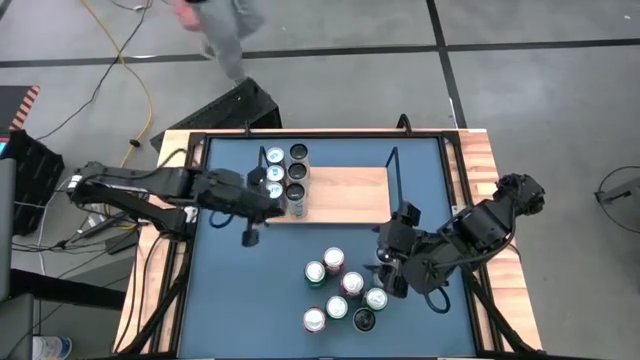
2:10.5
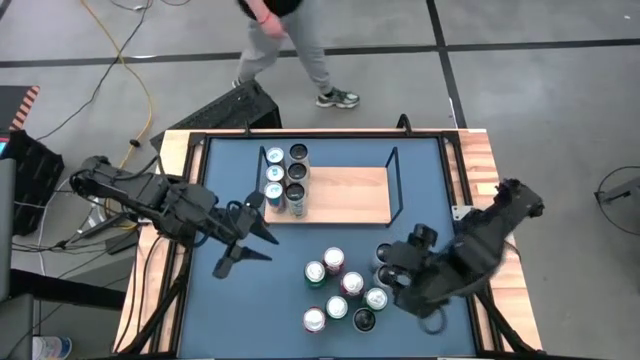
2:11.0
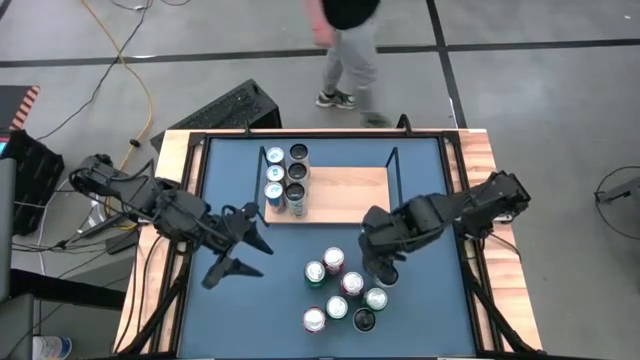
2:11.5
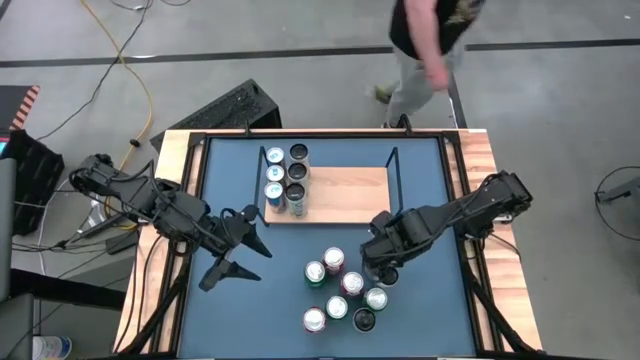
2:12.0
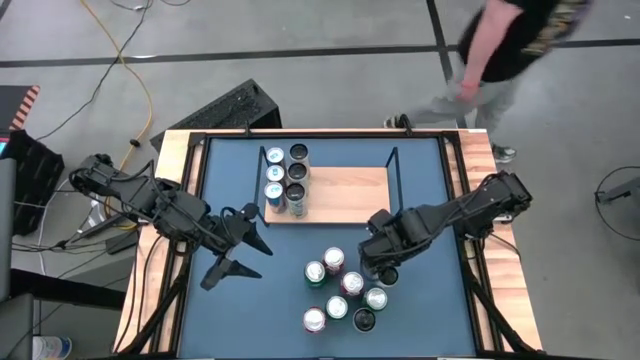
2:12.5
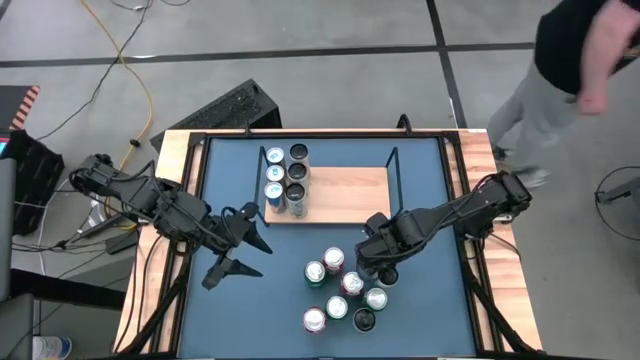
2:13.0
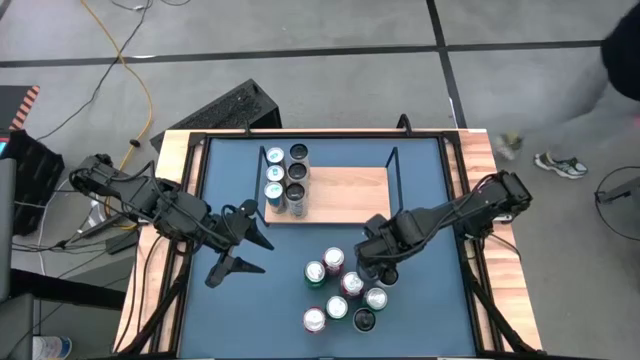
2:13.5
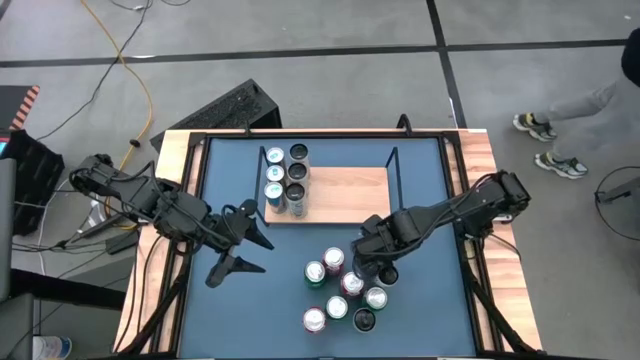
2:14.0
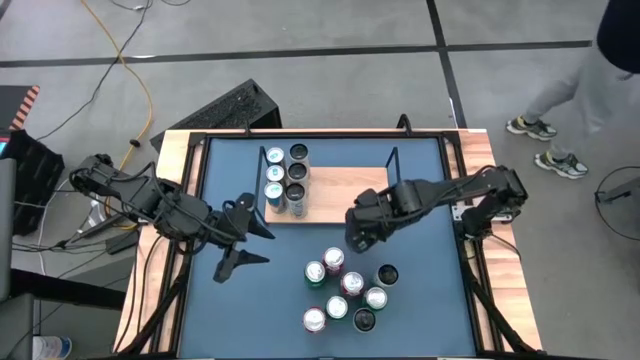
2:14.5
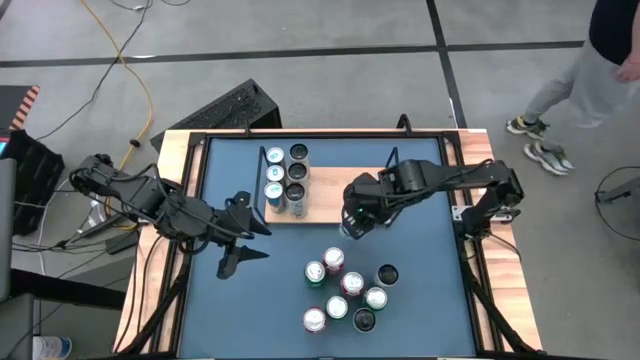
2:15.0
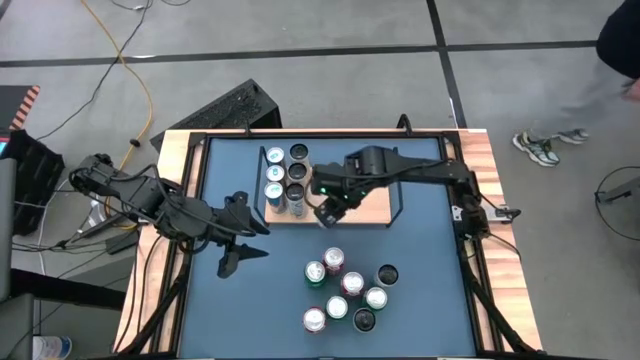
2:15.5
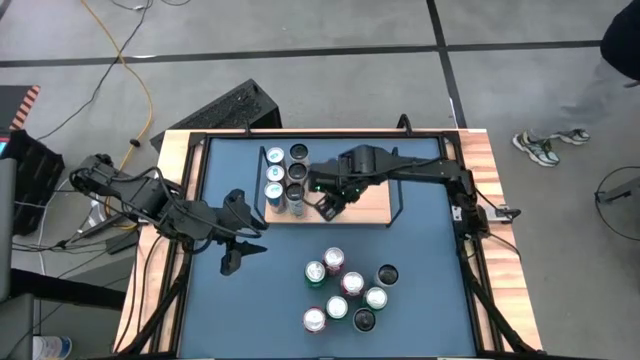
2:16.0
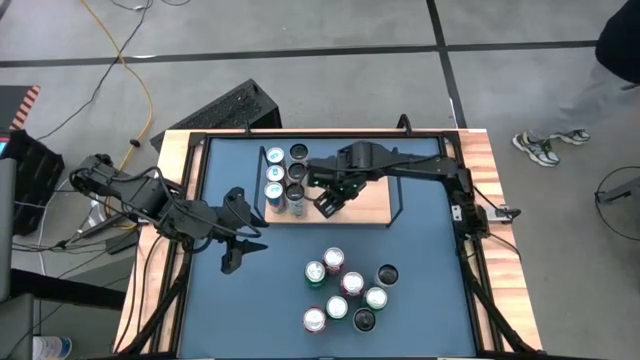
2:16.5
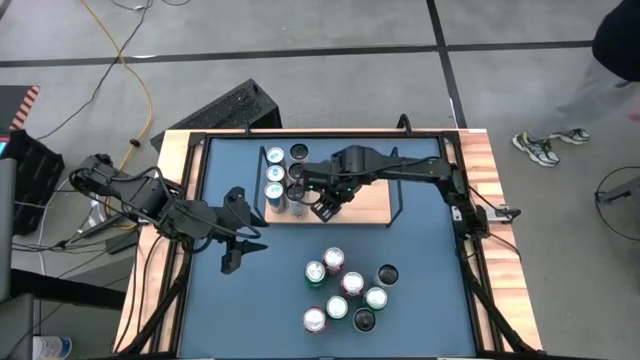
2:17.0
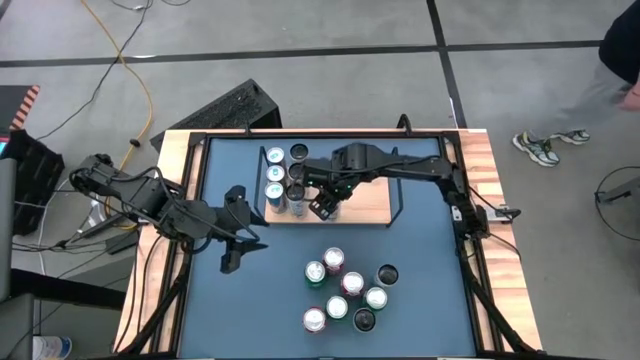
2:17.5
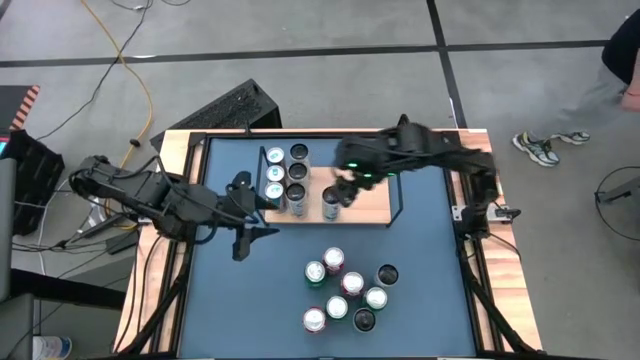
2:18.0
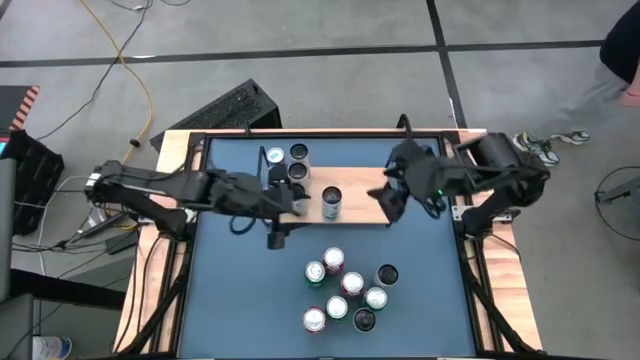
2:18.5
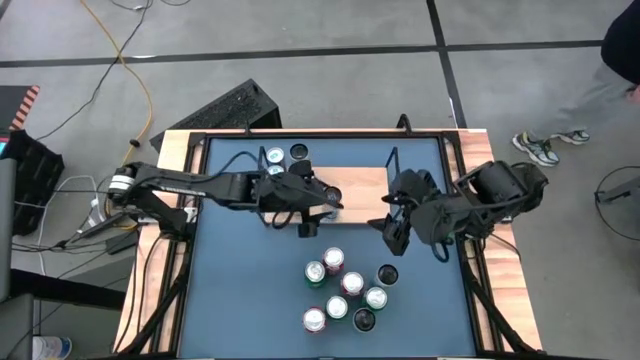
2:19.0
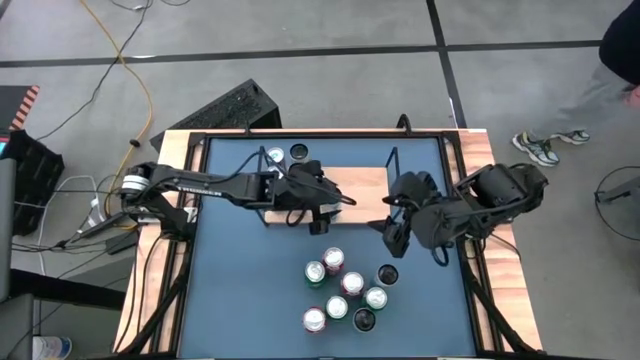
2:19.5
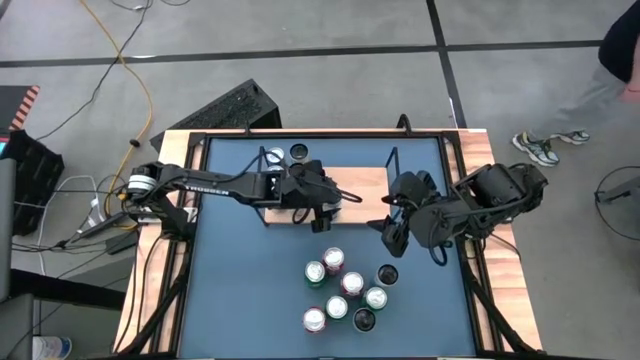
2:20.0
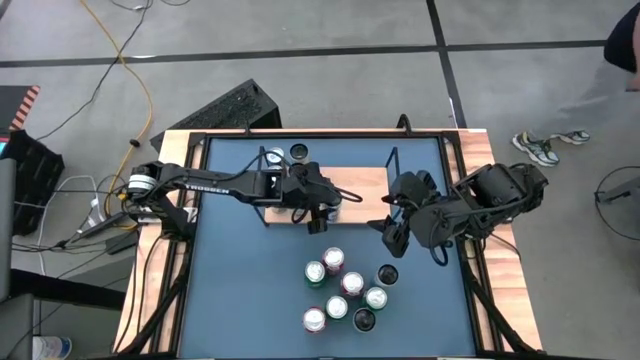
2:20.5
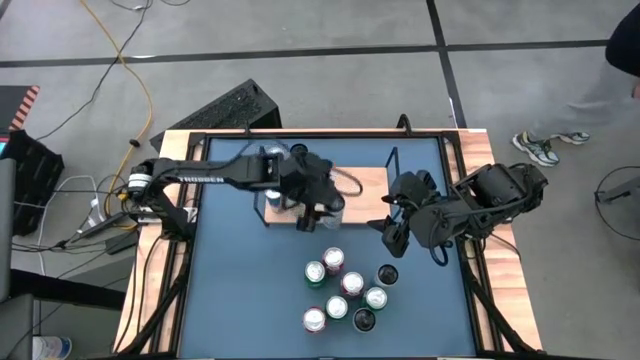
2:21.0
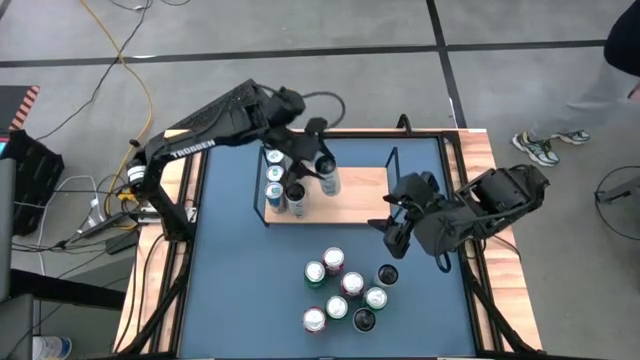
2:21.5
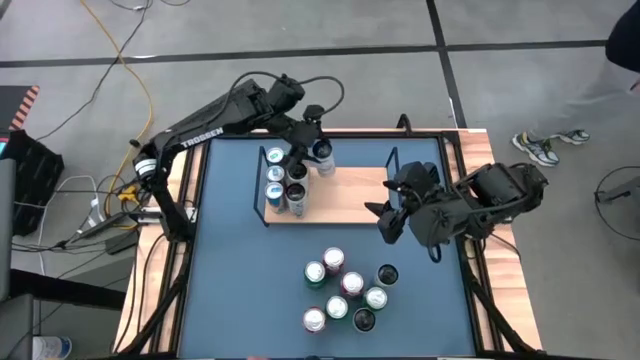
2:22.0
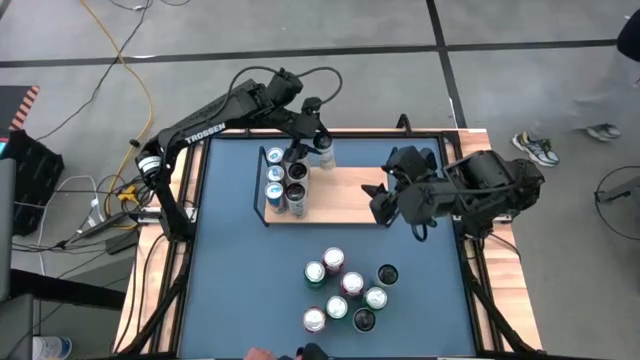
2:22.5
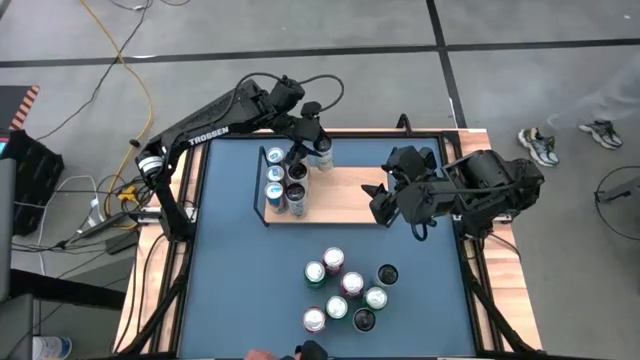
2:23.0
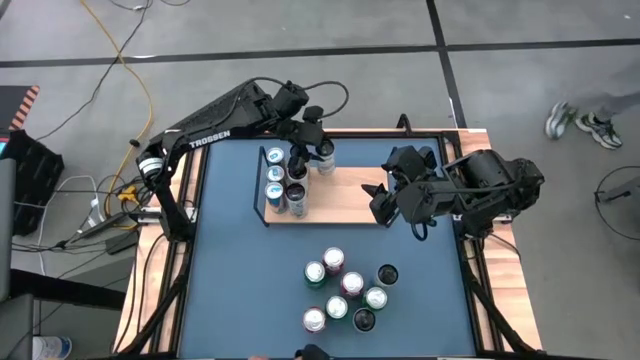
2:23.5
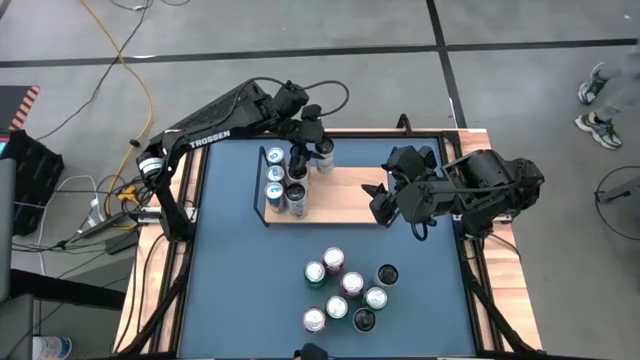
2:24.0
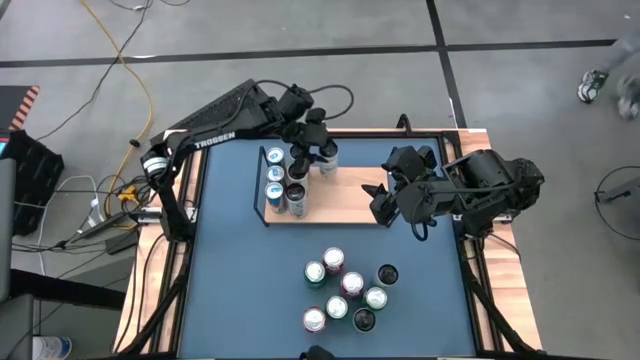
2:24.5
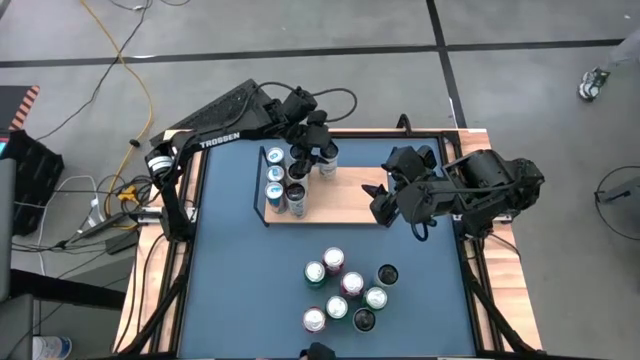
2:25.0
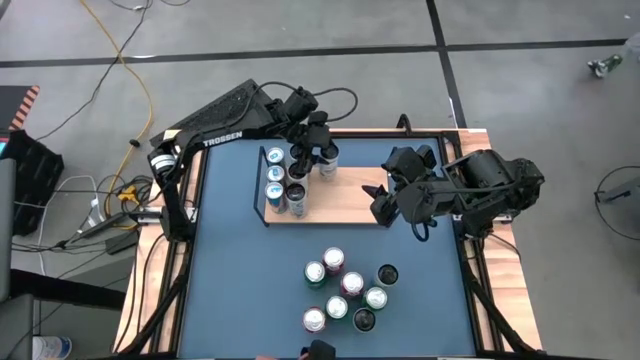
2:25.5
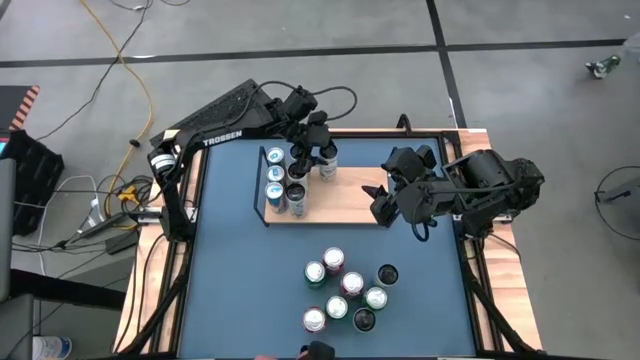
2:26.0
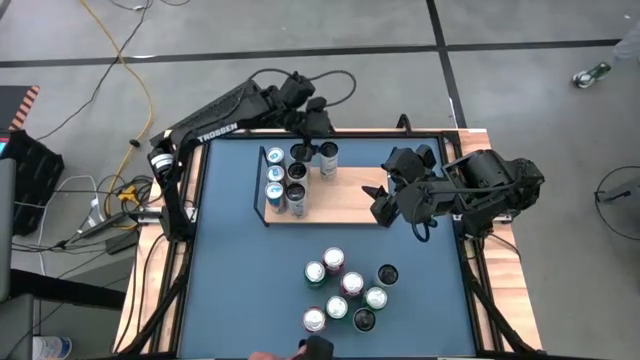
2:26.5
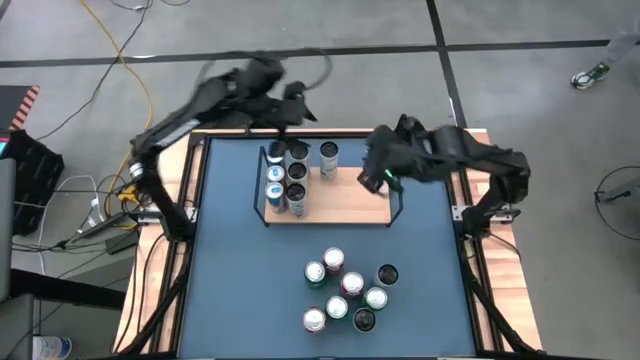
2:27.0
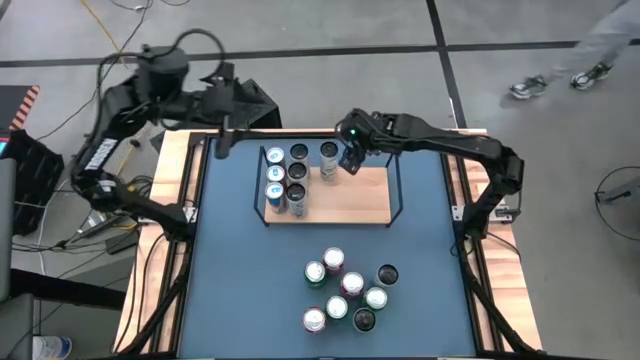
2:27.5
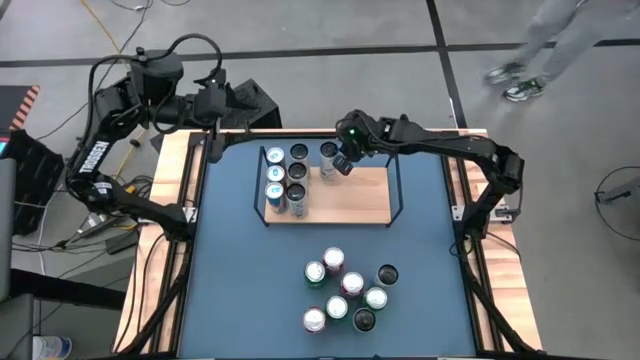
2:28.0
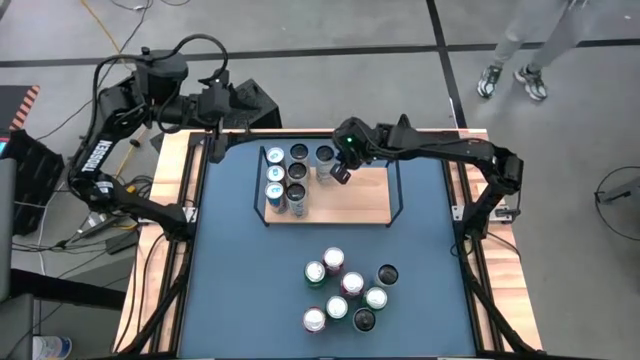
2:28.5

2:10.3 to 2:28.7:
Task: Place canned beverage on shelf
Put the top white and blue soda can on the shelf
